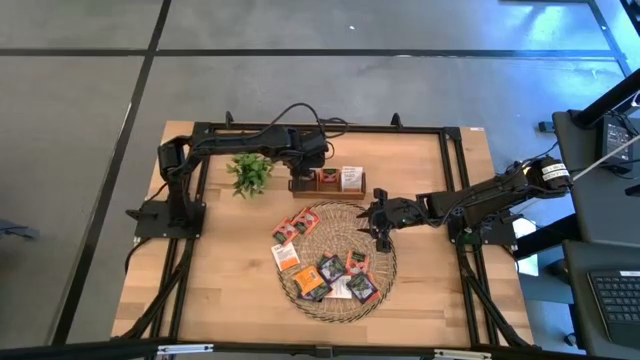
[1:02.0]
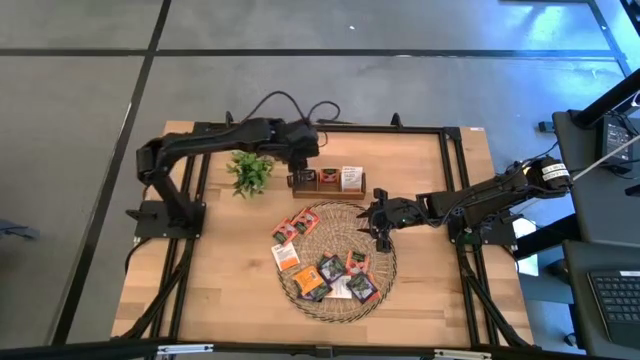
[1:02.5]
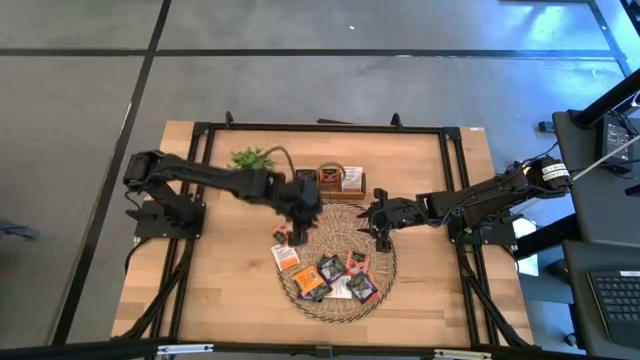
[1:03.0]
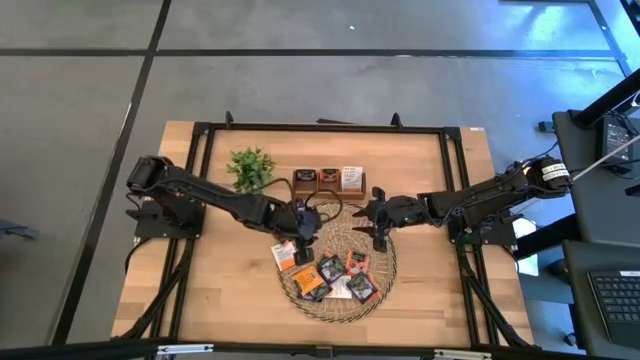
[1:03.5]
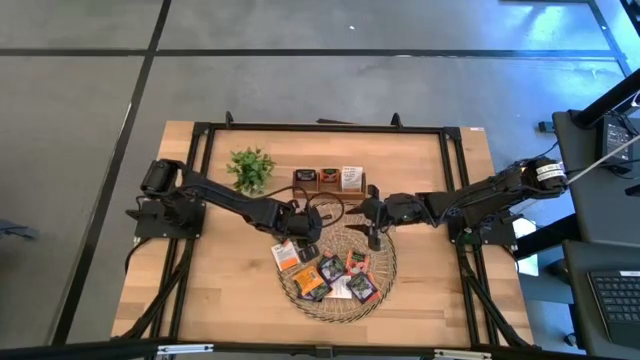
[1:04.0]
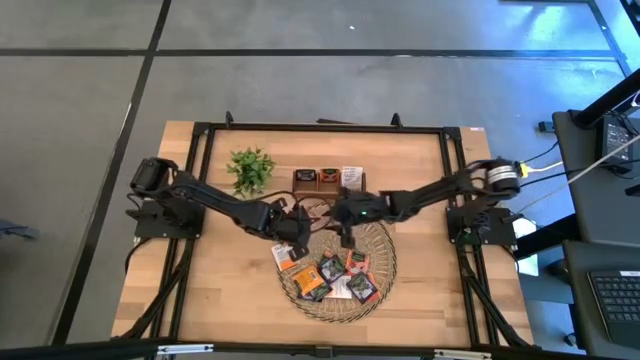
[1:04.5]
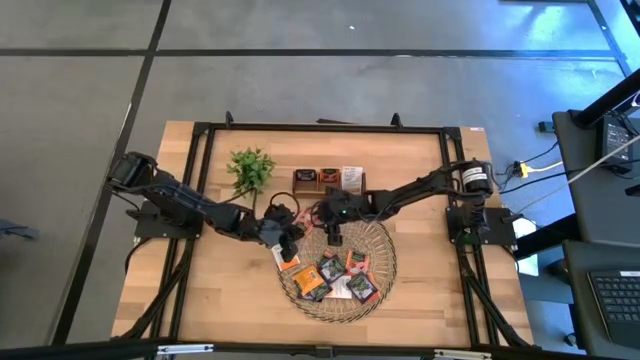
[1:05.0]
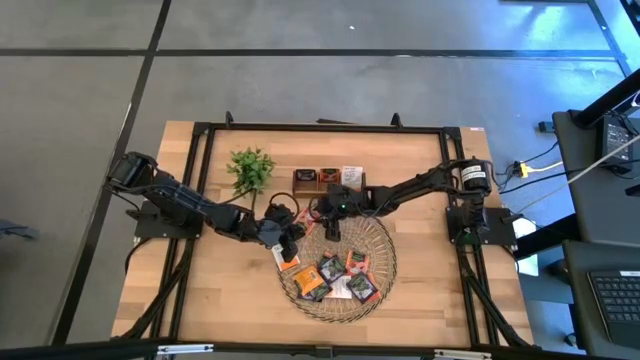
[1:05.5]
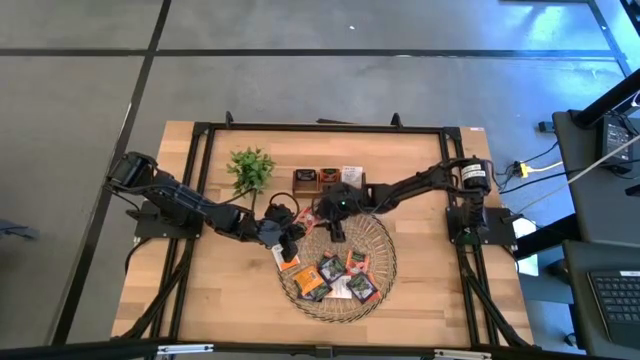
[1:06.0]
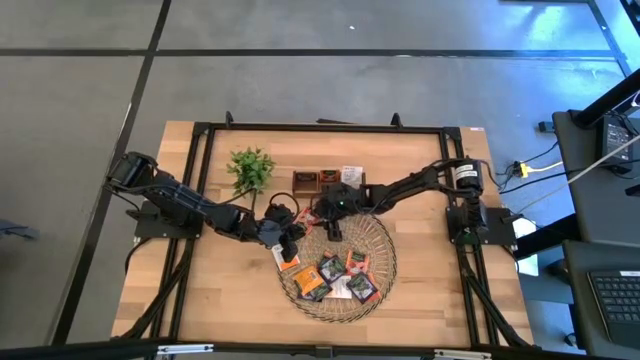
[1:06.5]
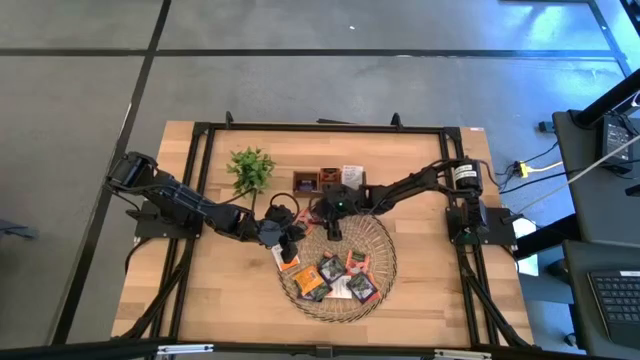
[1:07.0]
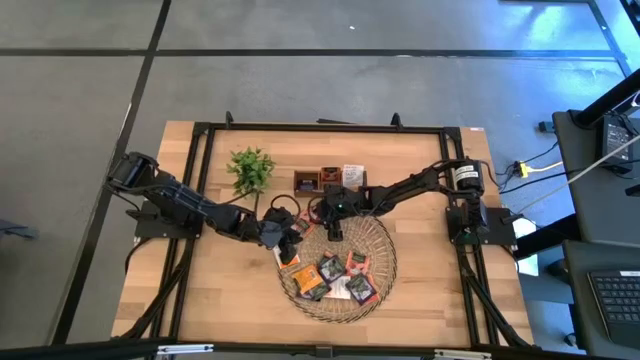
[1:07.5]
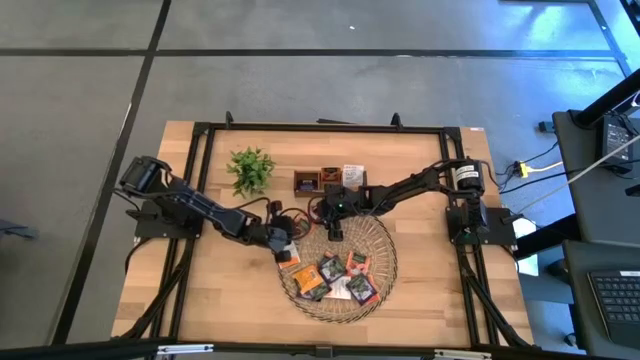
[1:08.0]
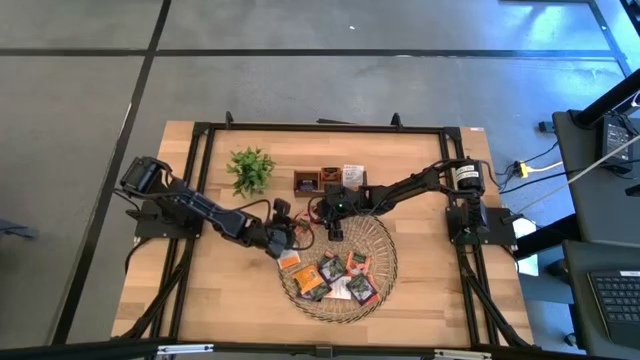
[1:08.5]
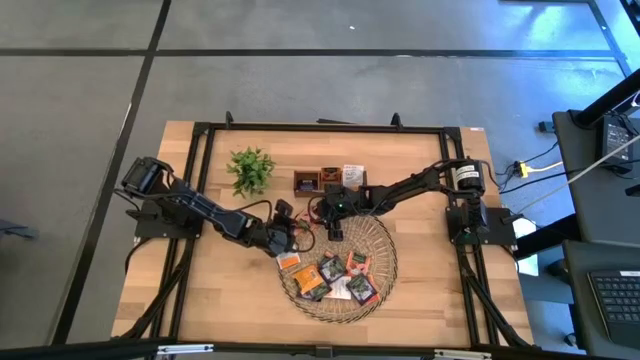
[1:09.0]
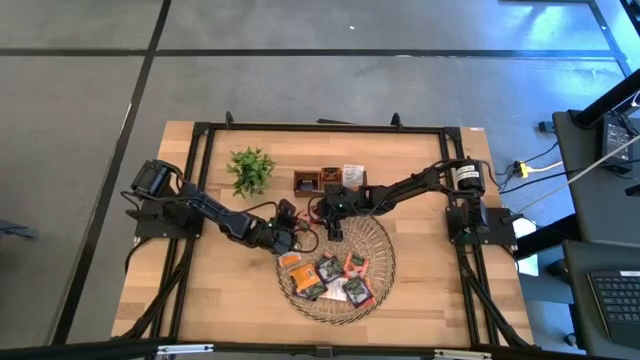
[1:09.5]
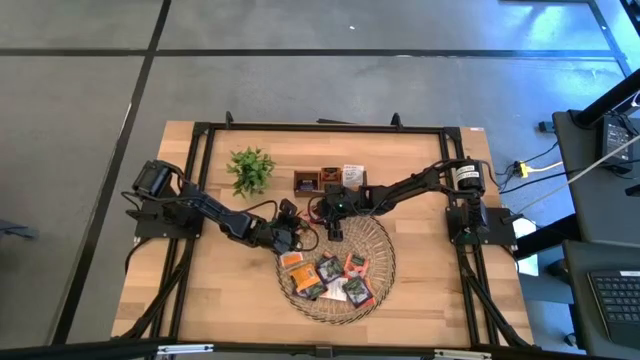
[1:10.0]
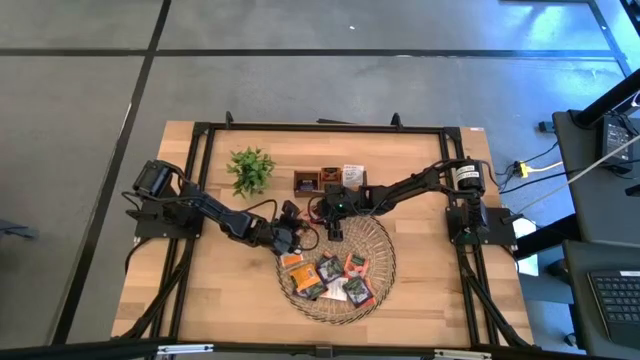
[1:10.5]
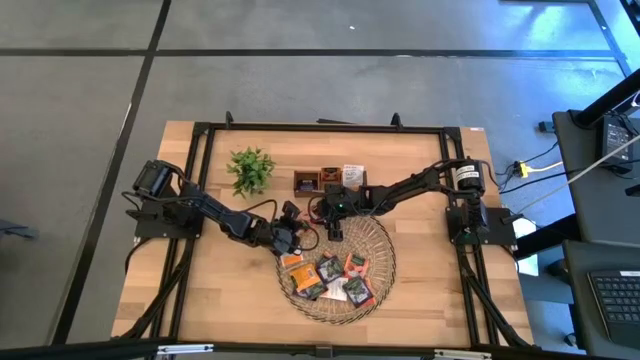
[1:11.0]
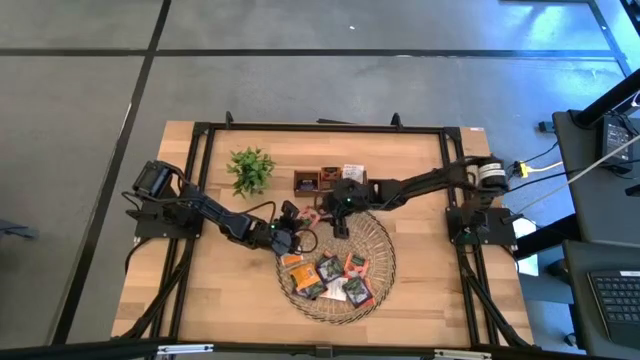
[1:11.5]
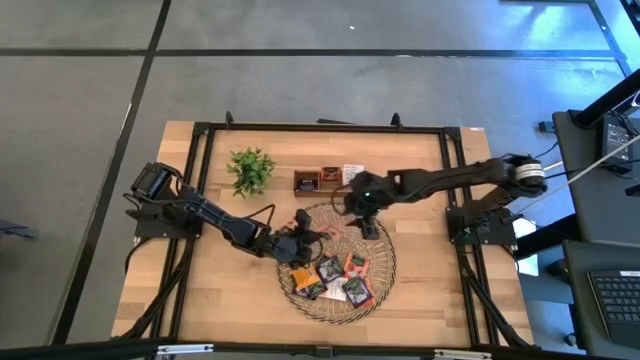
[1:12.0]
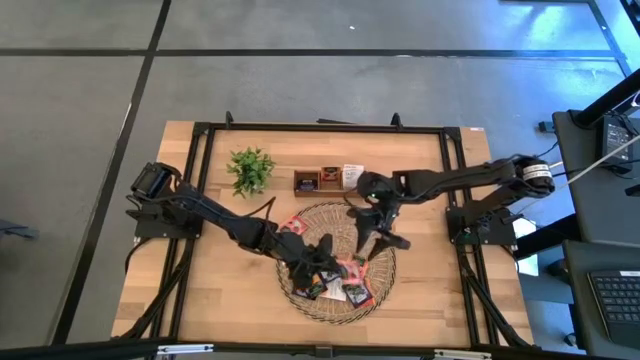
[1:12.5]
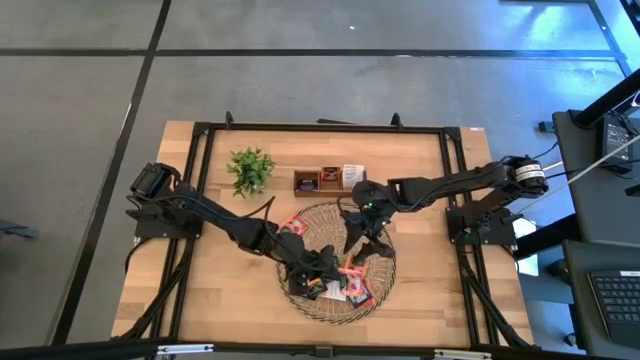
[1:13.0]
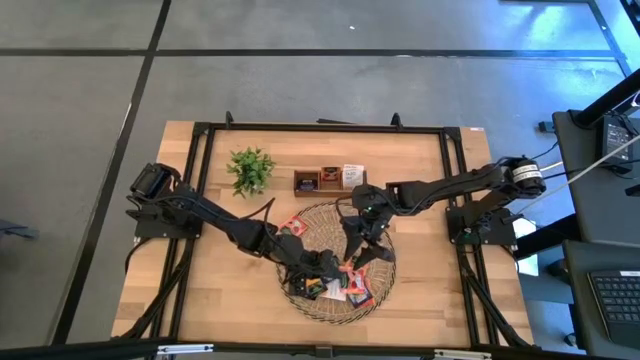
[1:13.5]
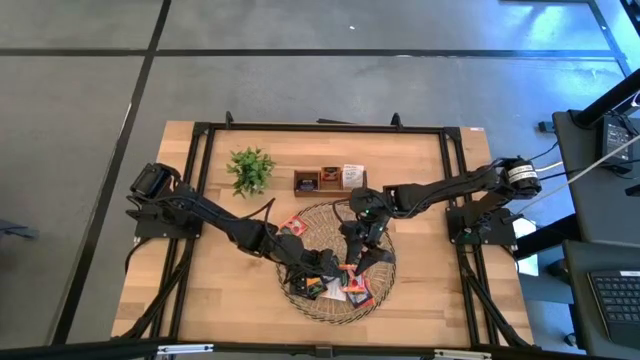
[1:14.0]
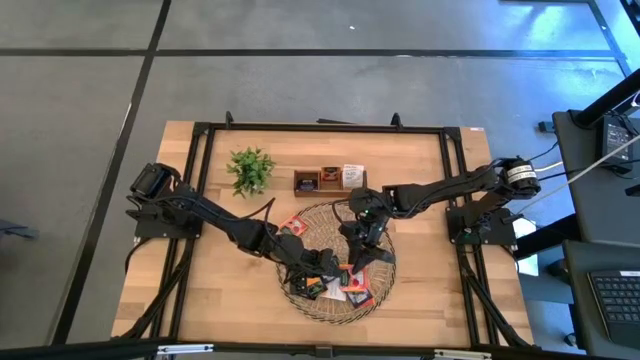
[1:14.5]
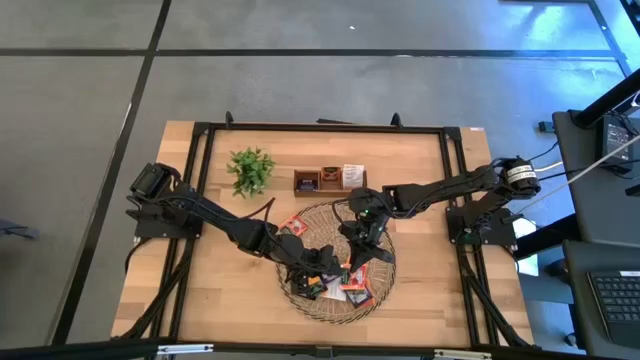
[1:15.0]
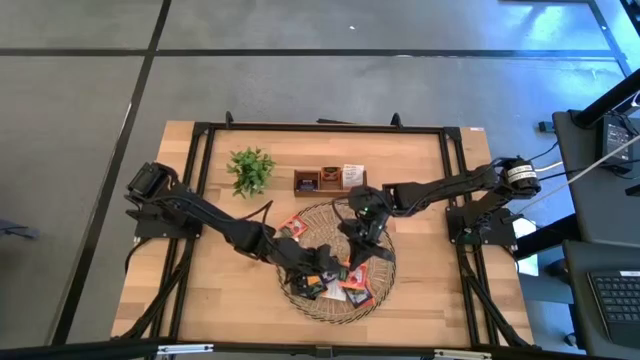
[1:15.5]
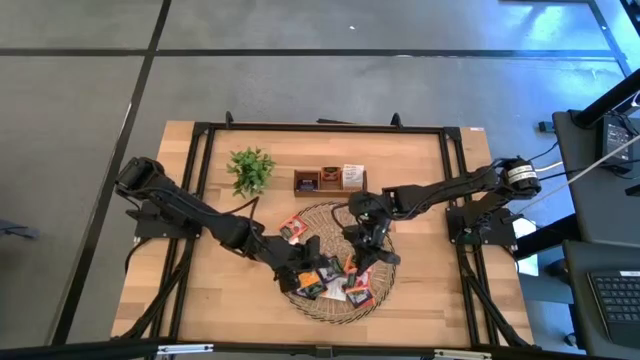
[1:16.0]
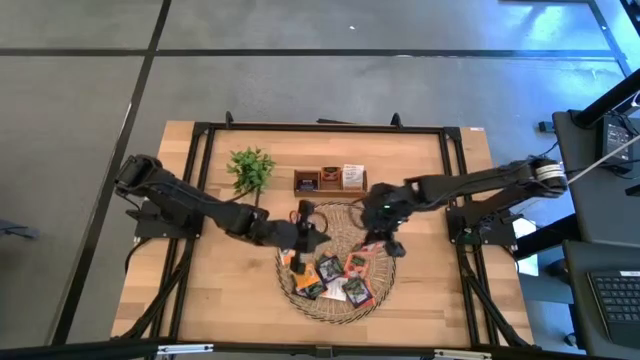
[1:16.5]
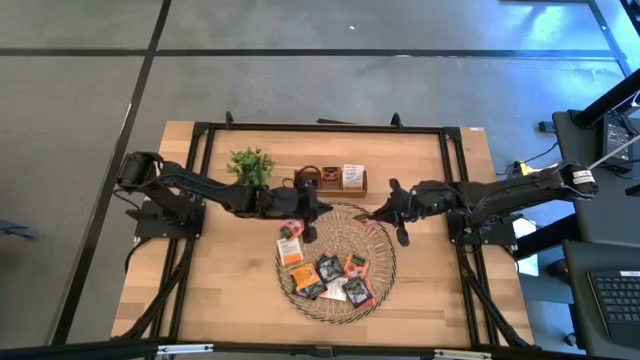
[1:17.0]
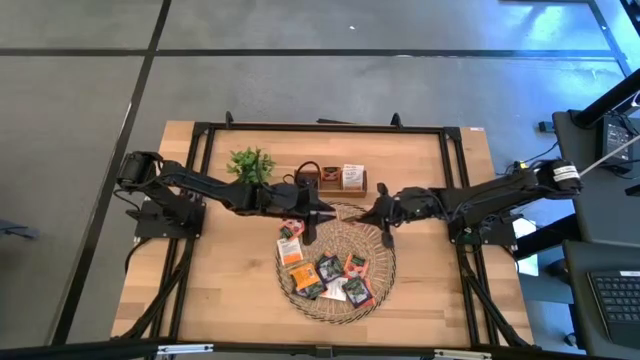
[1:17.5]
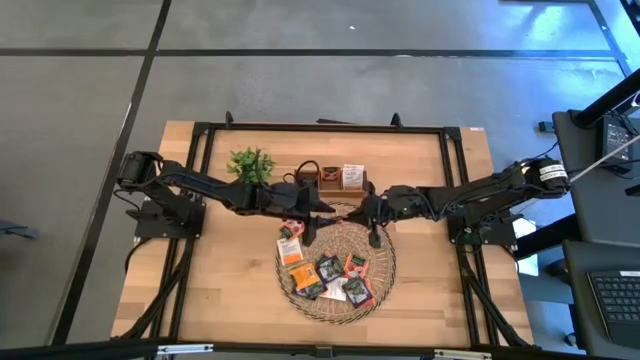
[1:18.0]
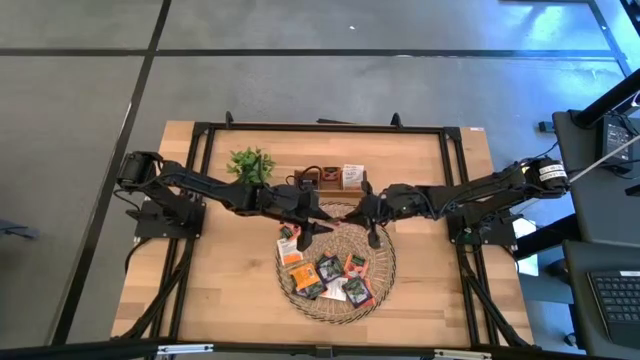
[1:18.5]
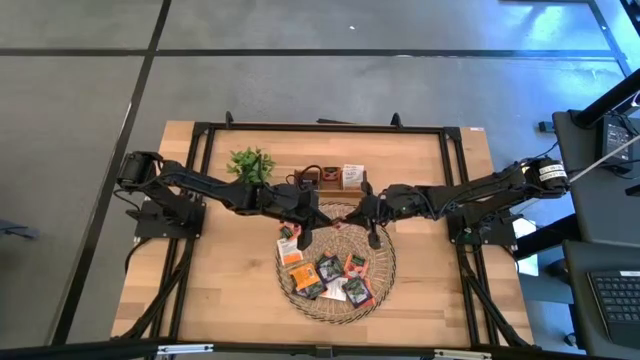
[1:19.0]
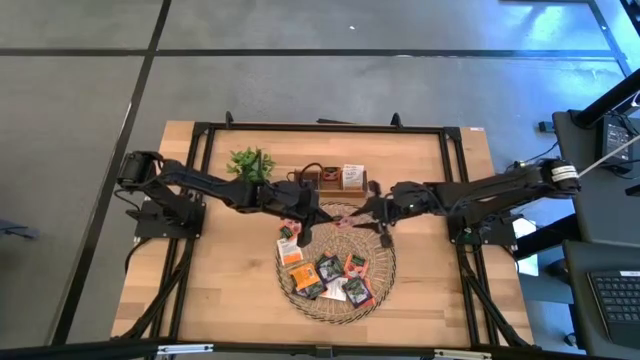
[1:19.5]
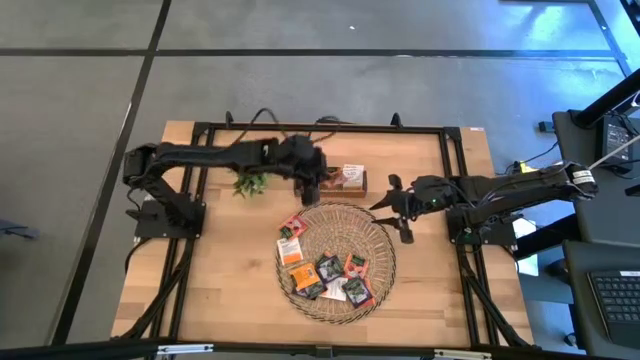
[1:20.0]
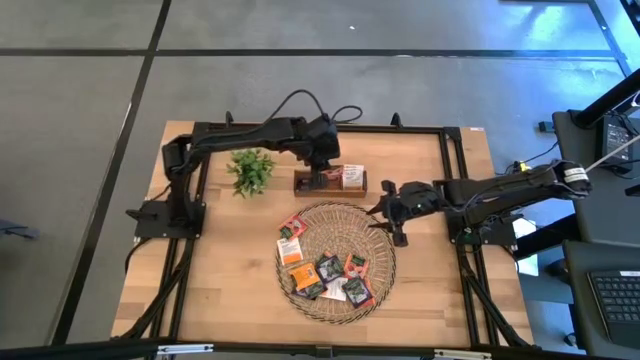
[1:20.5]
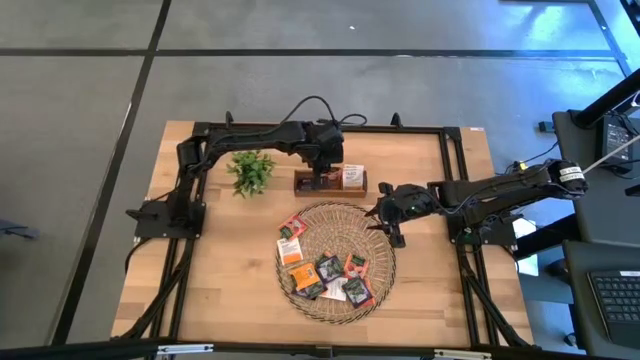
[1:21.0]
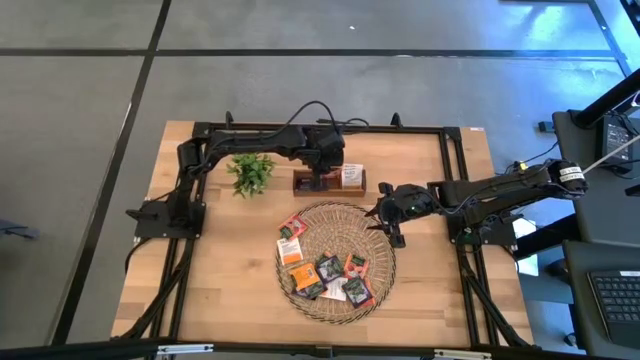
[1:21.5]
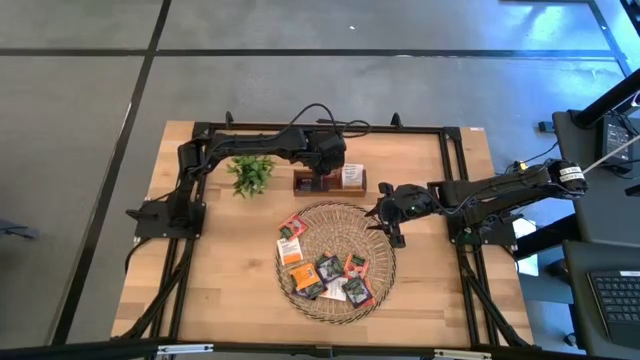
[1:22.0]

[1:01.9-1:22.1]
Task: Pick & Place Tea
Put the orange and black tea bag into the middle section of the wooden organizer
